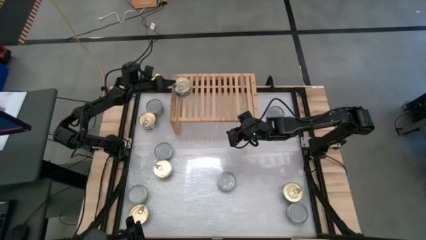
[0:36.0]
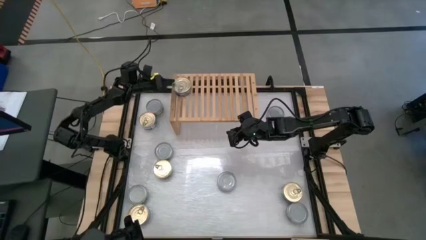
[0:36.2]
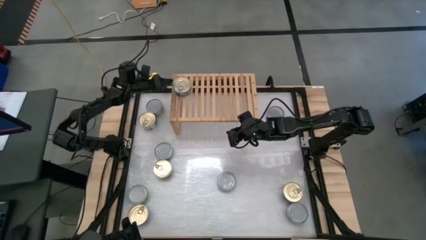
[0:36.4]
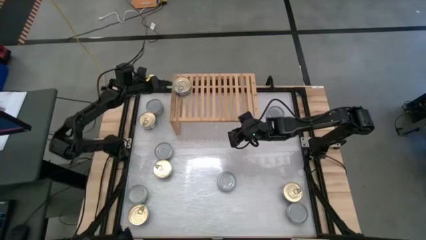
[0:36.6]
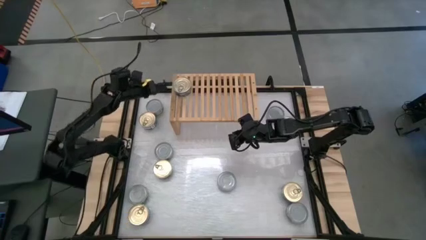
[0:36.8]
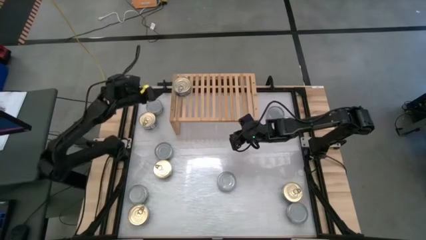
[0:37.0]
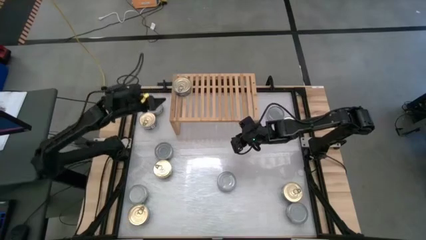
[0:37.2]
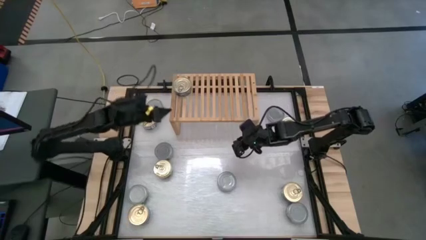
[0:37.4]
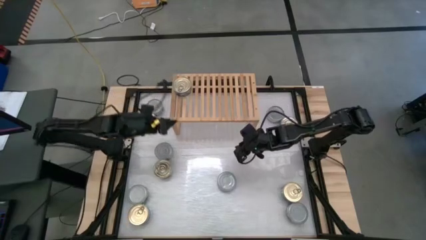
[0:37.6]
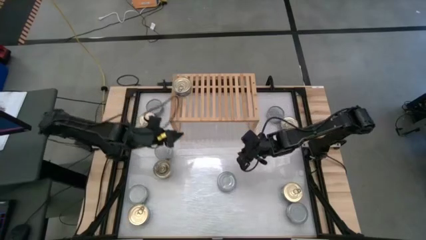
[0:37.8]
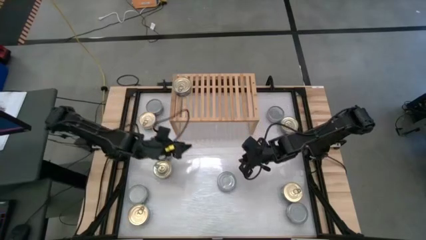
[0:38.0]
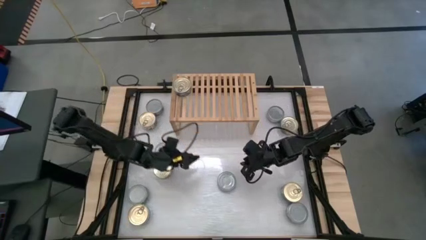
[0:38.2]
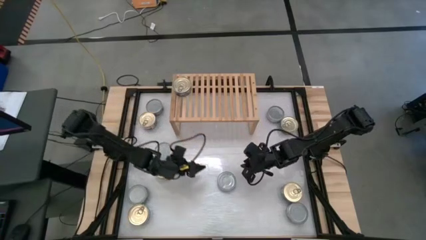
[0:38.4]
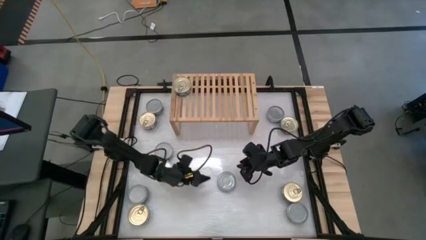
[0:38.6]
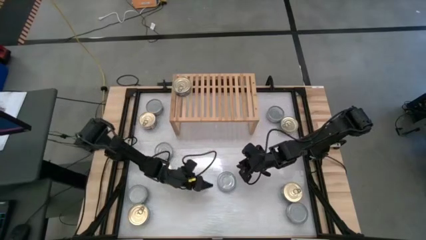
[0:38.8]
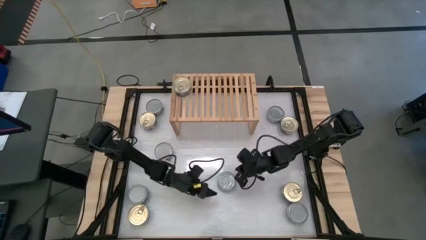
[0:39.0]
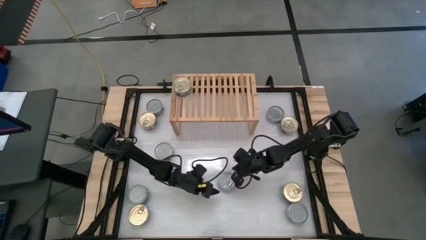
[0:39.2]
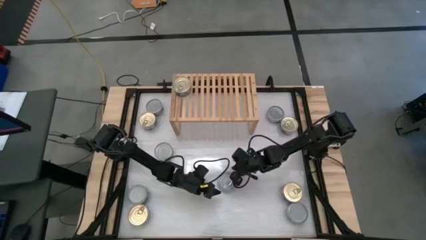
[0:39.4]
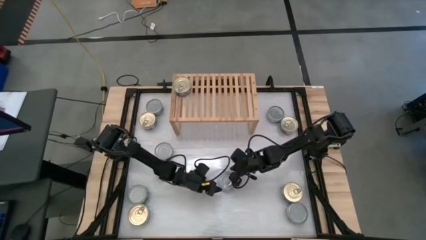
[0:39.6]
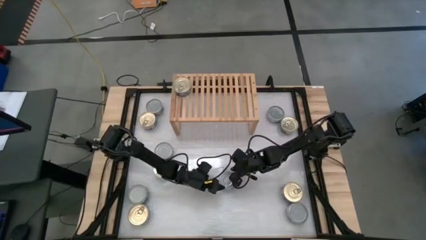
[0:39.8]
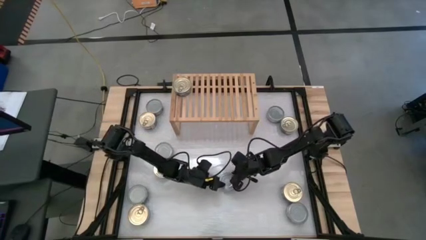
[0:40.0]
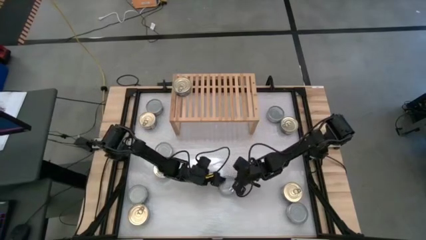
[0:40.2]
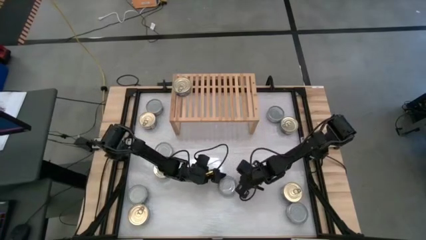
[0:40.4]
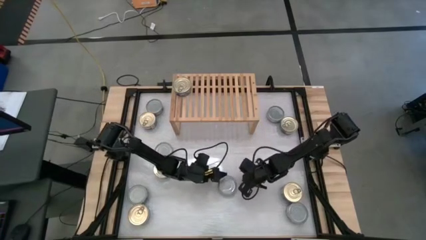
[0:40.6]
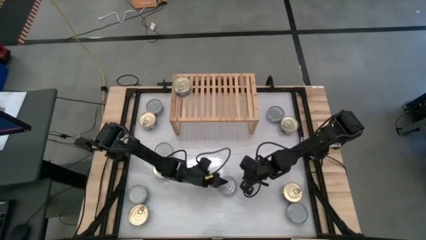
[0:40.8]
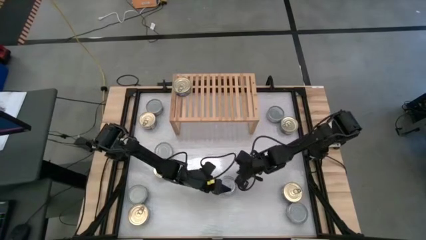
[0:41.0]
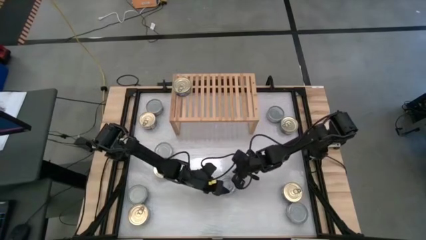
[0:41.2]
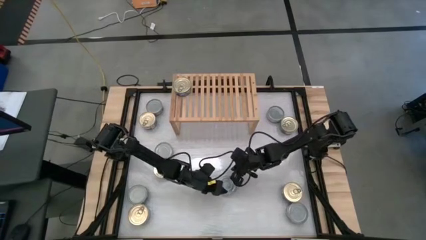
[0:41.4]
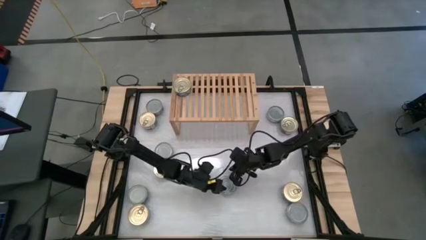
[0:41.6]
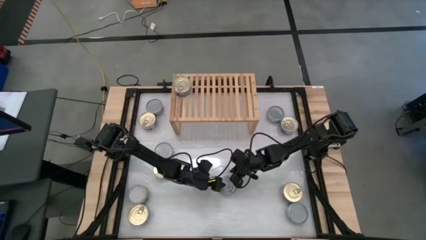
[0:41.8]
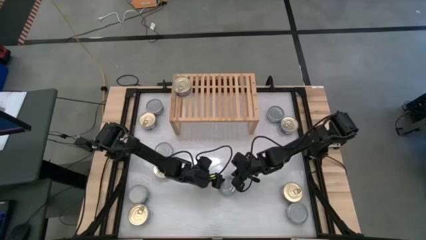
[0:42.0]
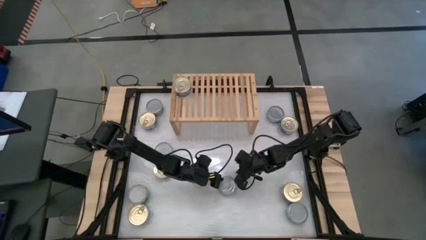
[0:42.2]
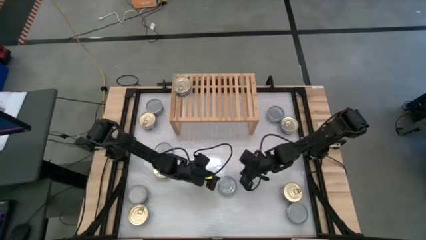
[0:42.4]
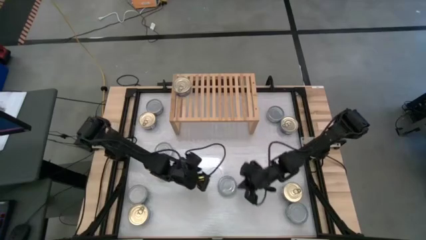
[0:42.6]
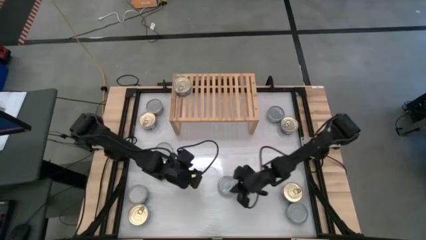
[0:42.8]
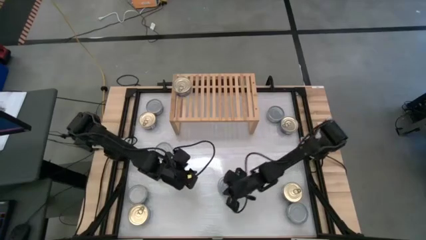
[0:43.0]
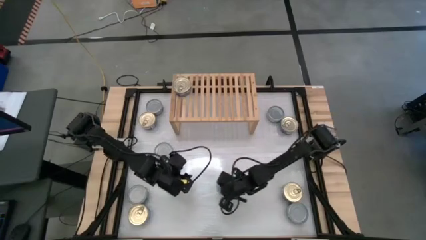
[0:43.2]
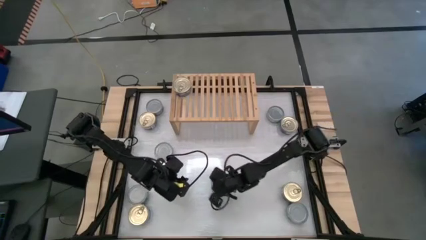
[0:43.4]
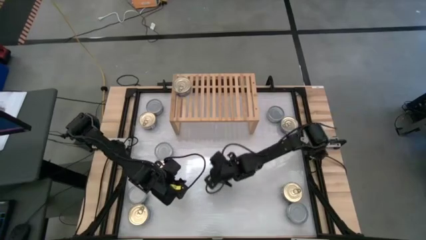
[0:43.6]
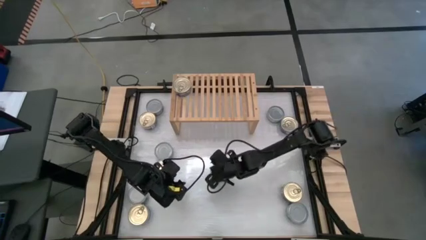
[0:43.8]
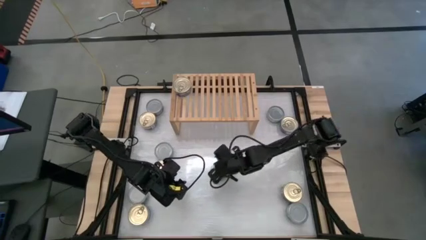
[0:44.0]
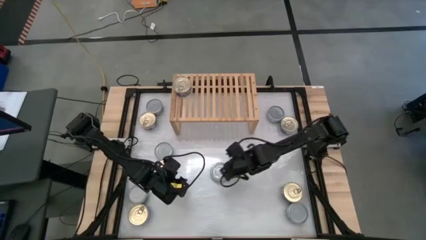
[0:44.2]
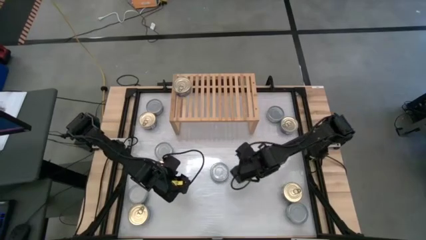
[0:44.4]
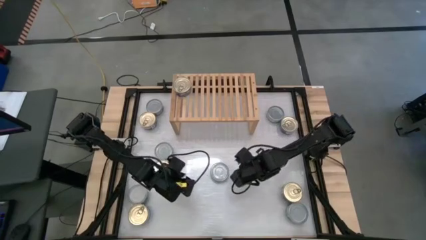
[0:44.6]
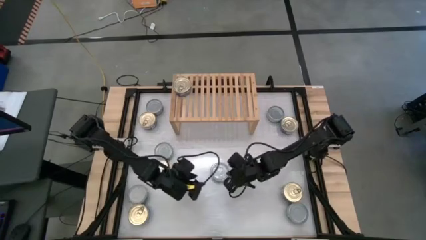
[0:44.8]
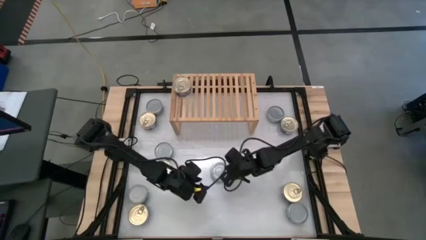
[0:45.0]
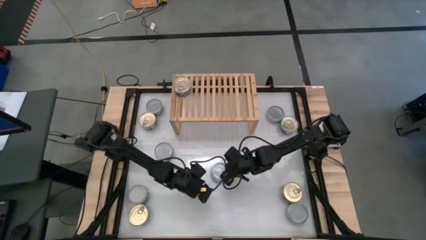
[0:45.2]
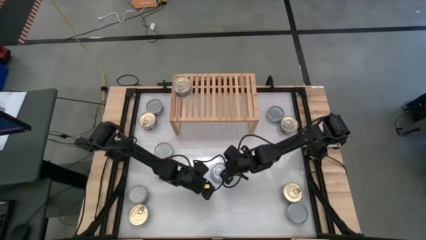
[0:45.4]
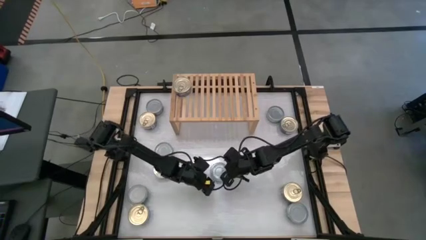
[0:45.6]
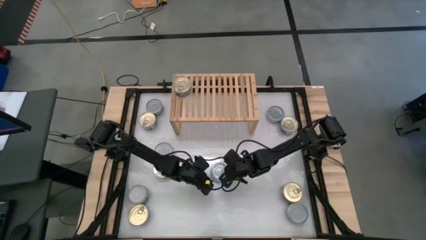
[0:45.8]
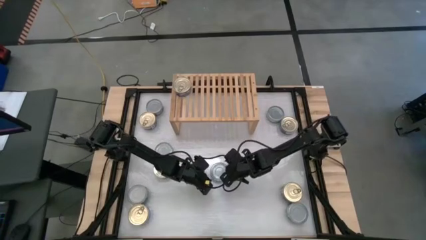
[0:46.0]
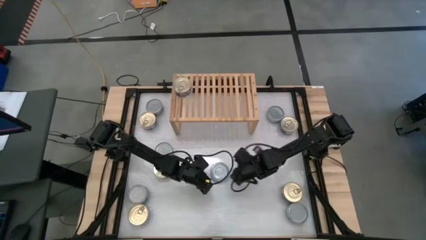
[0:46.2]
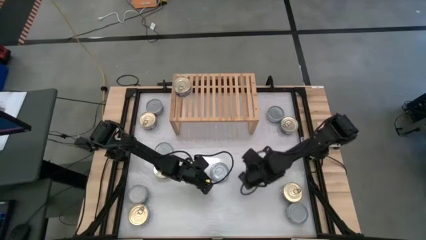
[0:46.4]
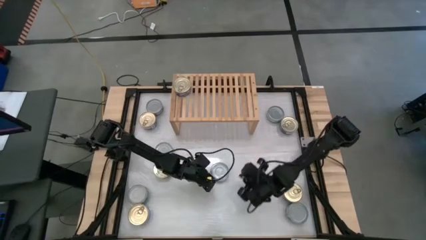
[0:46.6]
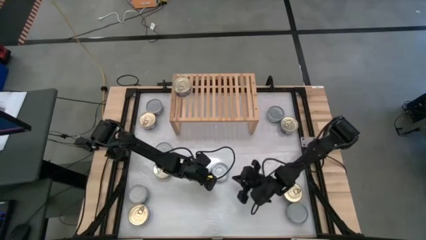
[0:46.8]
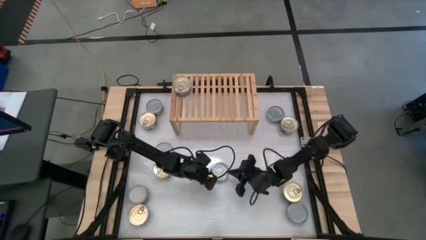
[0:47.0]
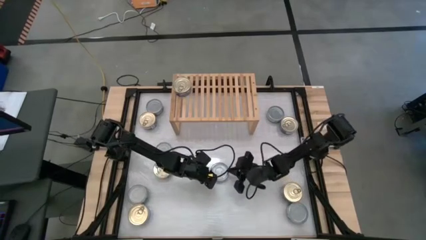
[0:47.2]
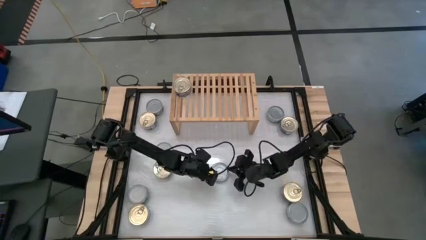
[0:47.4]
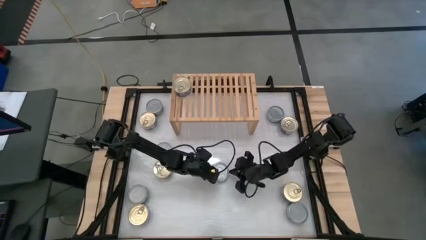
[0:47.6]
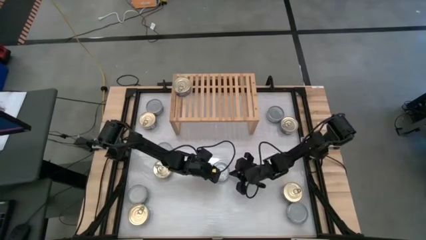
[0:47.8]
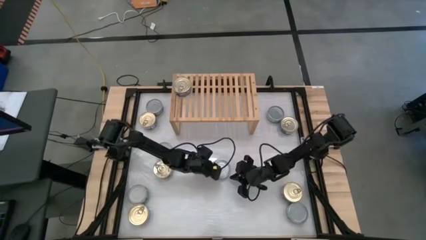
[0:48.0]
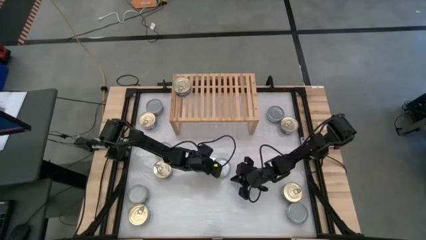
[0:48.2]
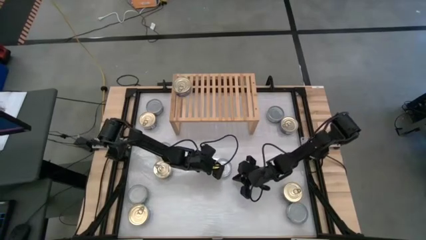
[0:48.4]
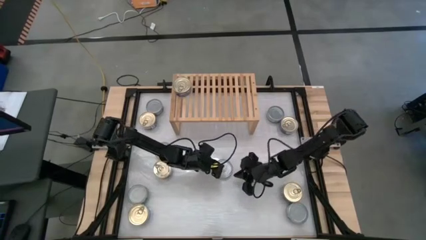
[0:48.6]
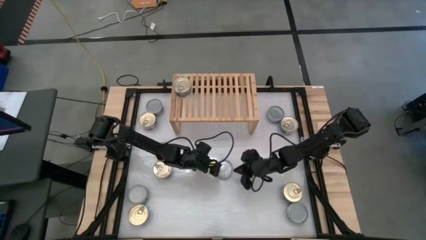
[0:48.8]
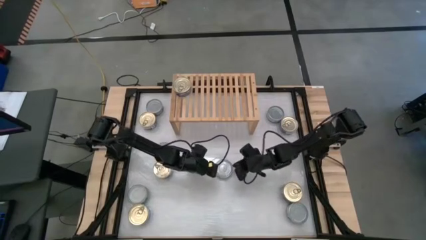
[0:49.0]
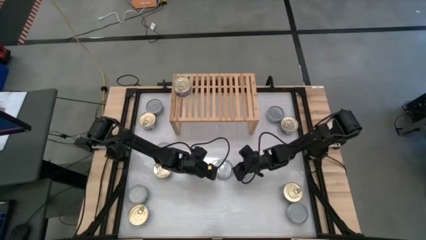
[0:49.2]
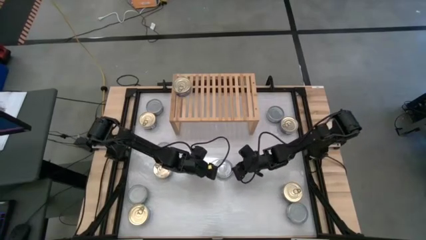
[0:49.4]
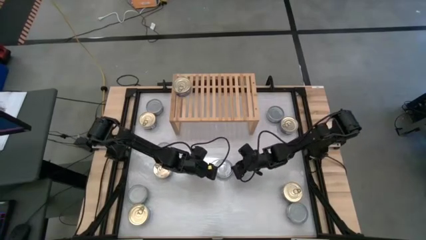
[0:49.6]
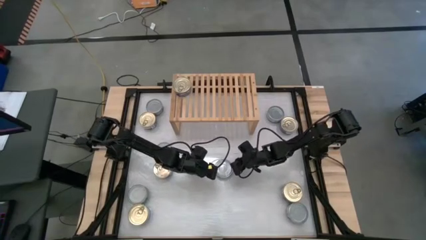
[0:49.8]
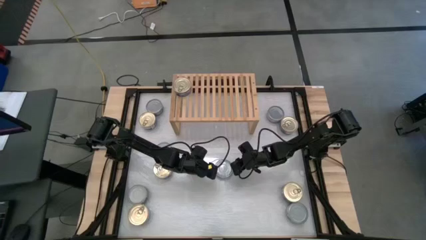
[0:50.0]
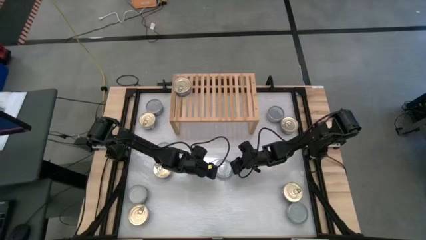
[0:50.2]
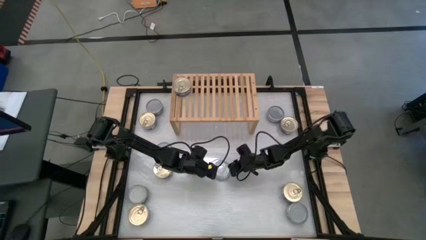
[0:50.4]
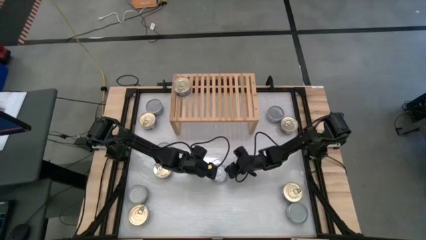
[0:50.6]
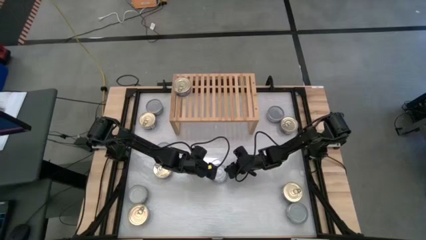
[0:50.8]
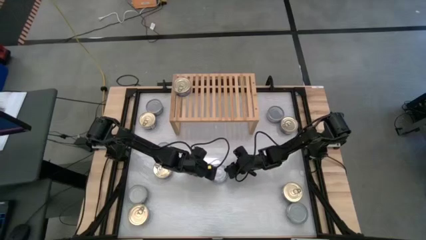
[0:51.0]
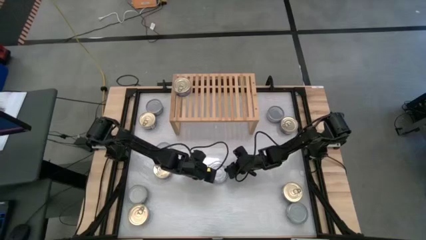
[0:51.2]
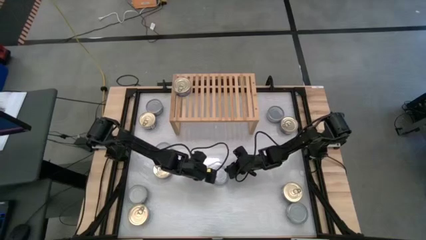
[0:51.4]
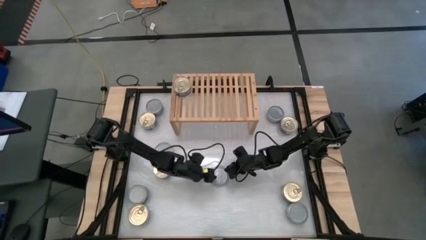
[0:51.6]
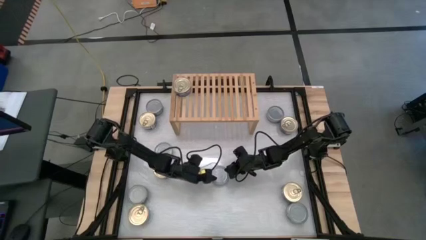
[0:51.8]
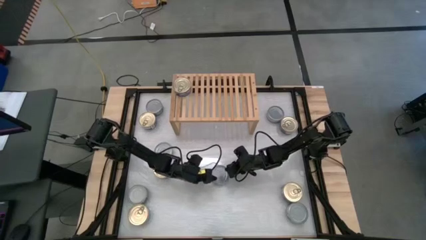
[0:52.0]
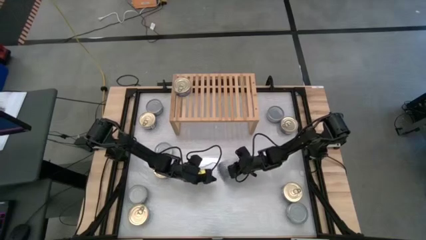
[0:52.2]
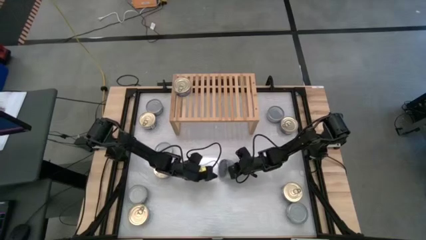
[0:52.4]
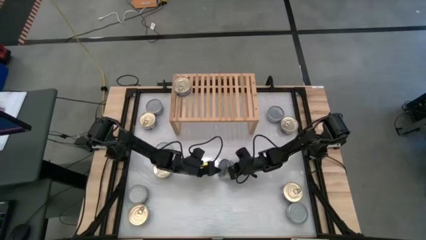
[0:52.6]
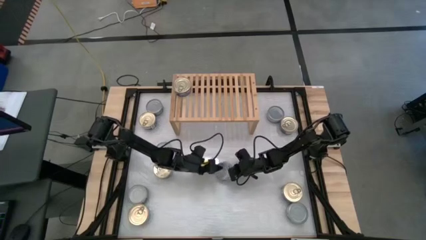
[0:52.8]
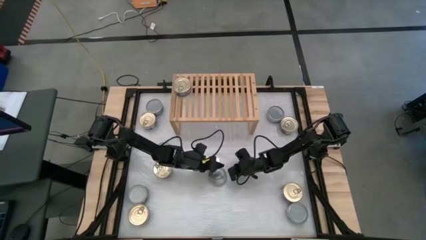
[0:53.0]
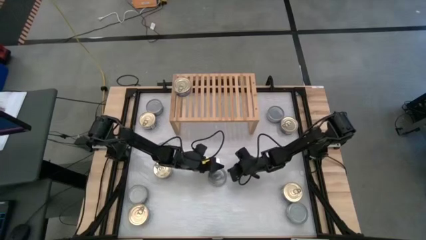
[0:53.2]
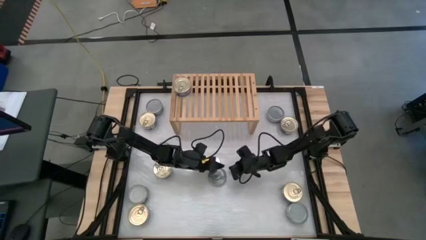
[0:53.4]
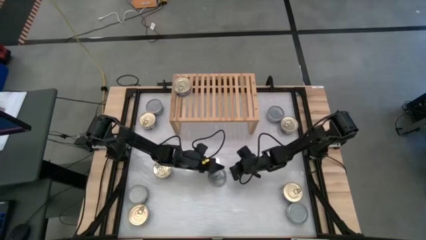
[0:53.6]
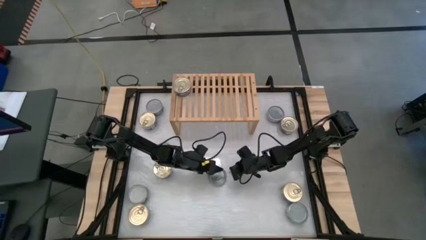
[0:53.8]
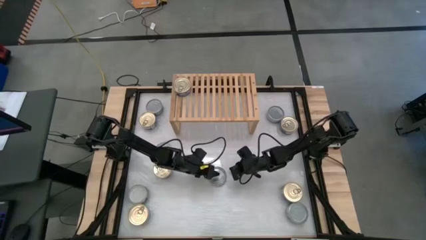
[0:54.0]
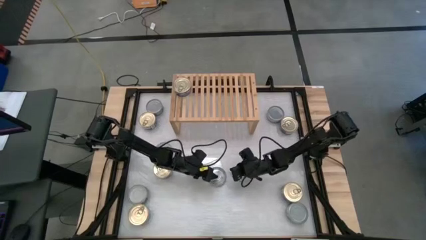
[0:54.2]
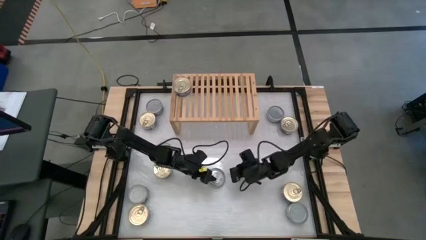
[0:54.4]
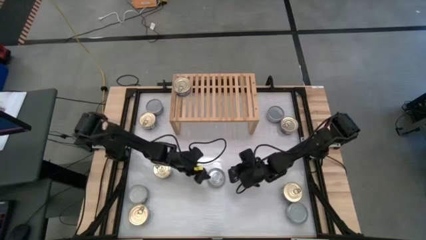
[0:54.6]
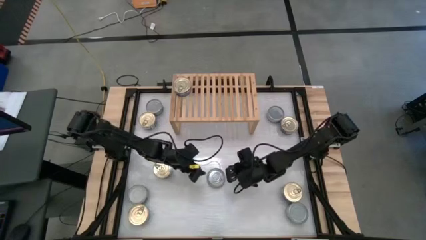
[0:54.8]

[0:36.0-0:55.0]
Task: Stack canned seafood by type on shelf
Put the green tuna can on the shelf
